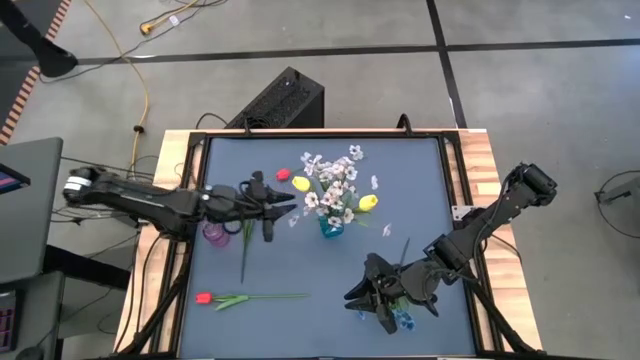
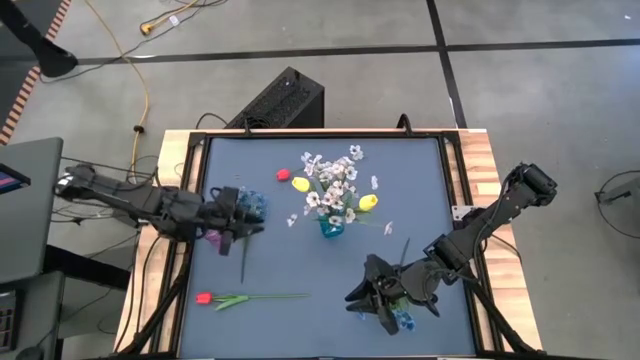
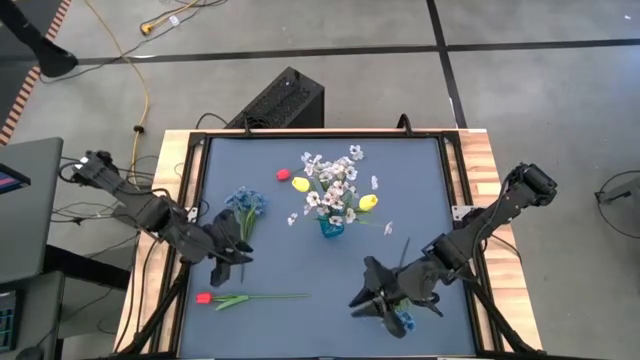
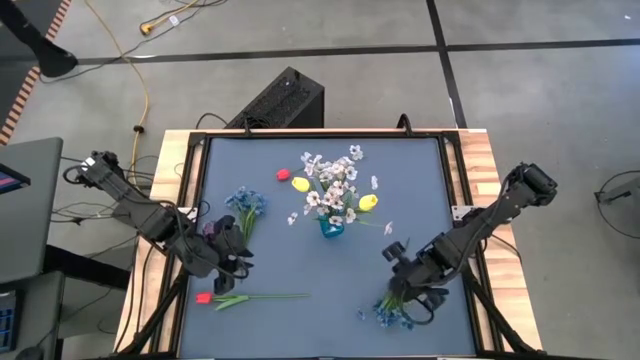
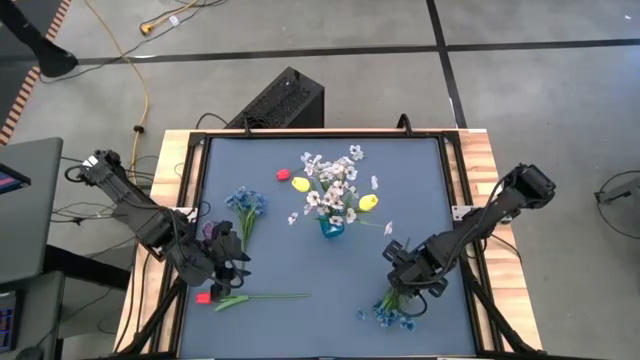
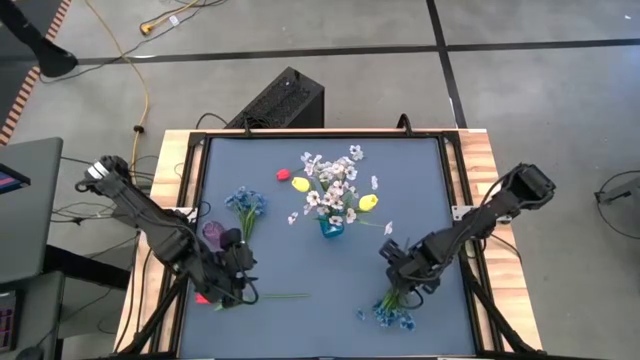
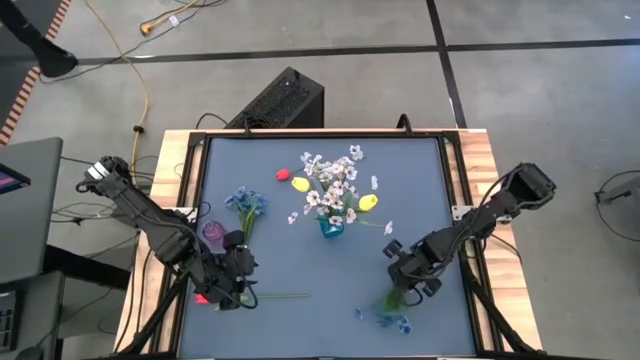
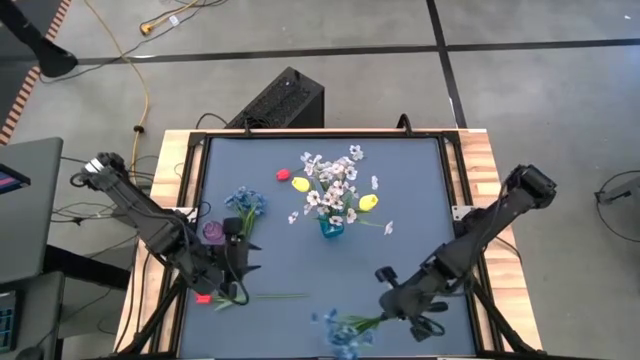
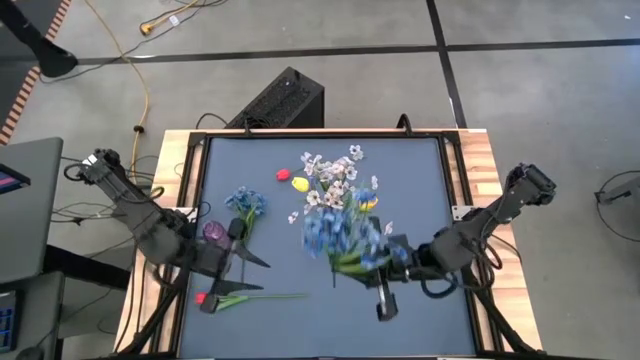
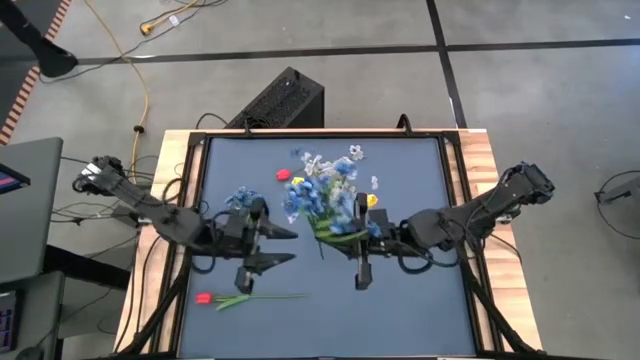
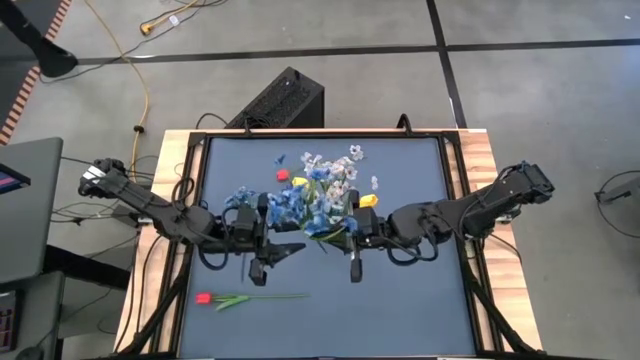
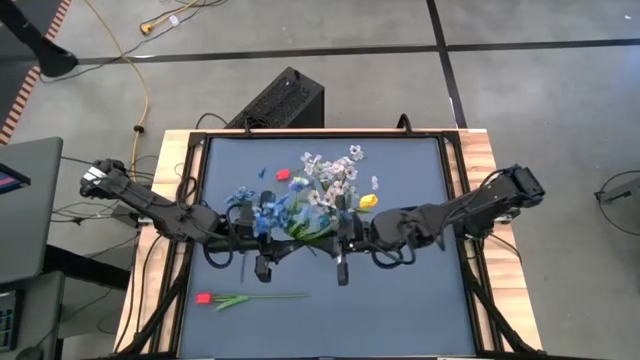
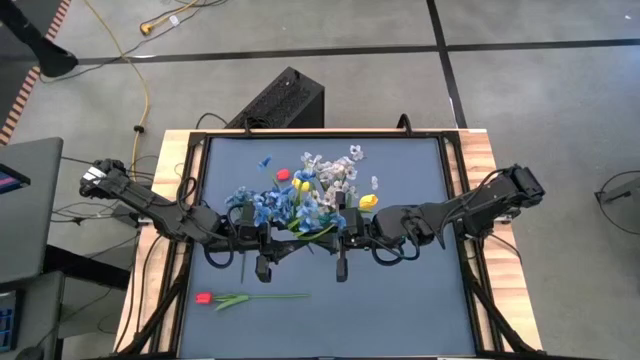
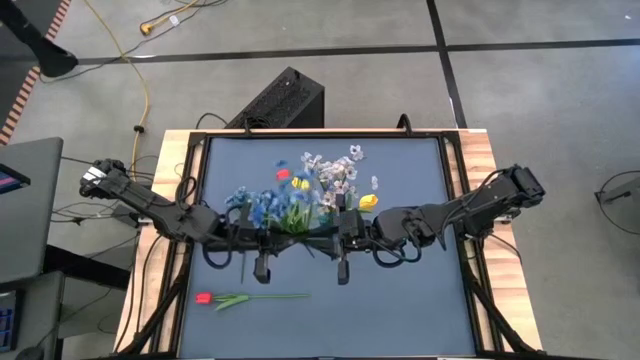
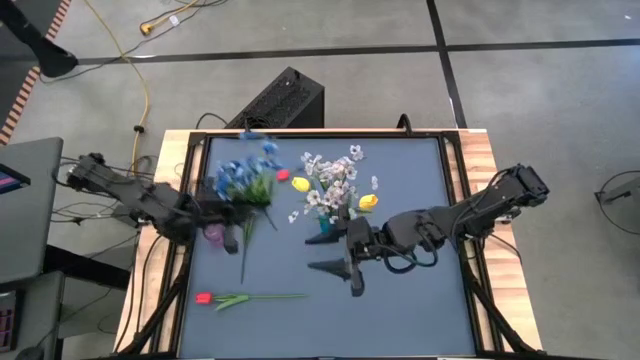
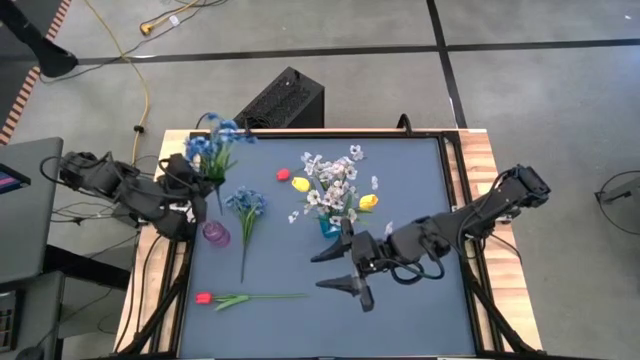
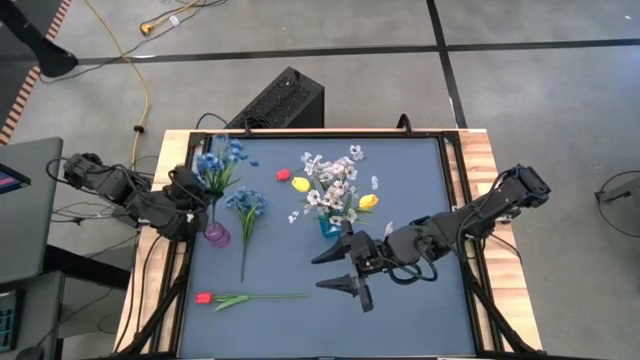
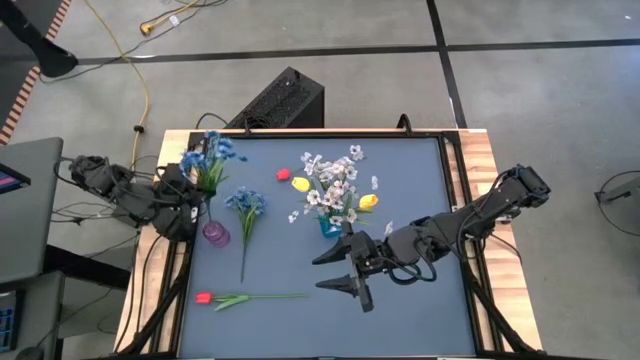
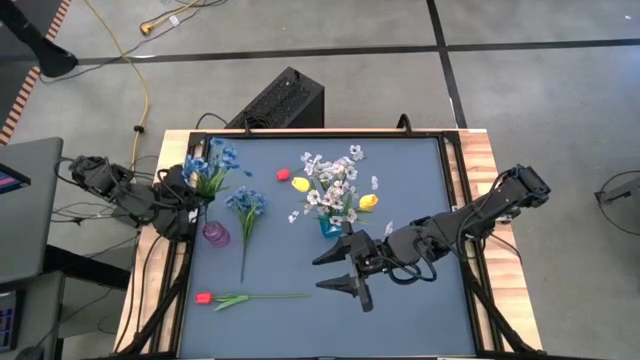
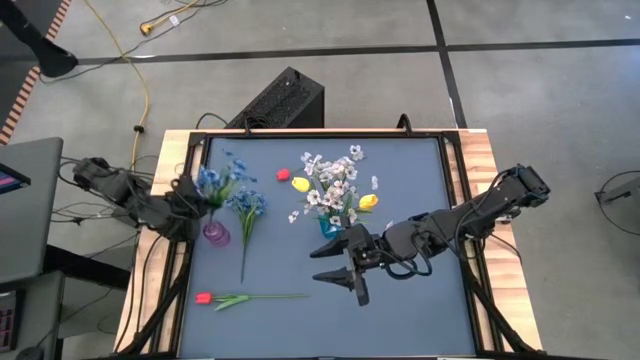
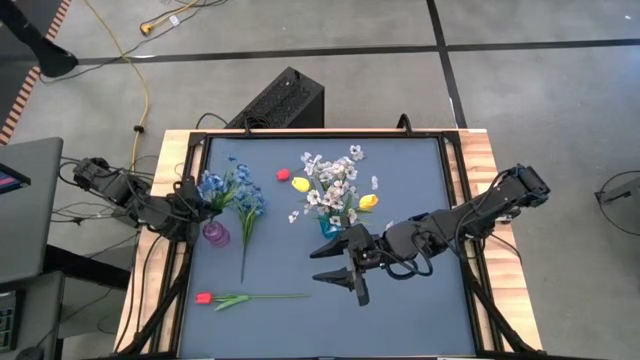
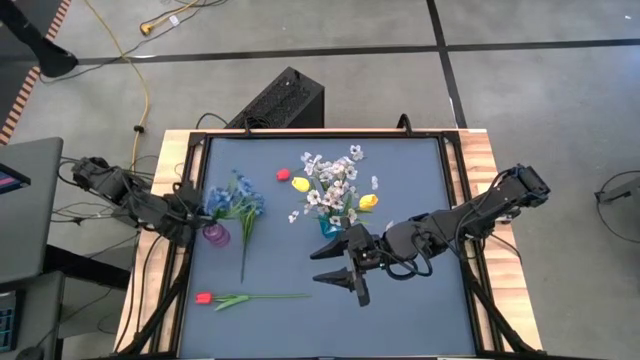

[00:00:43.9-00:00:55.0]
Task: Sort flowers into vase by color
Put the bottom blue flowers into the purple vase

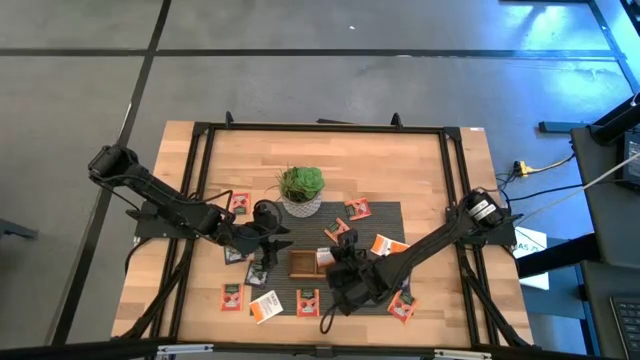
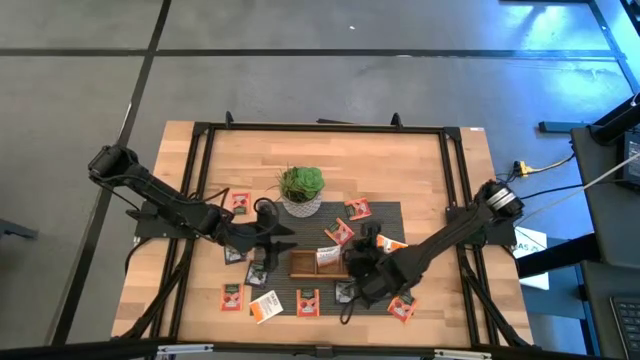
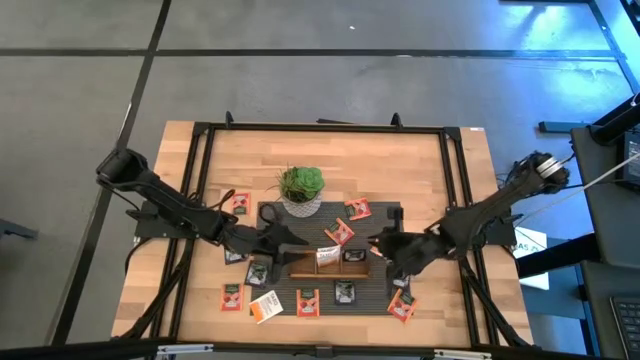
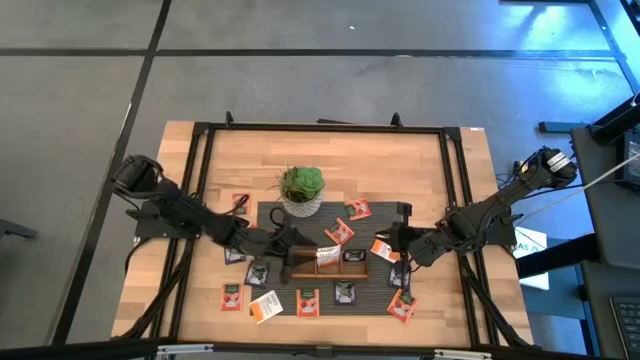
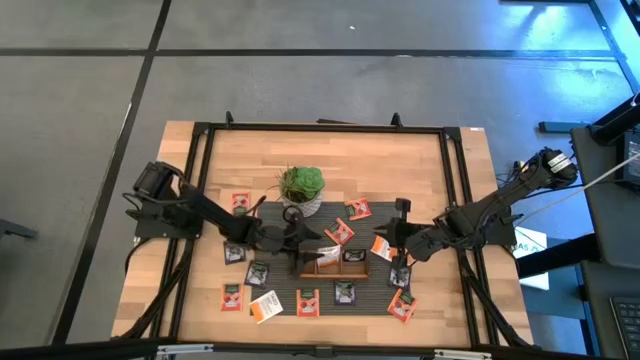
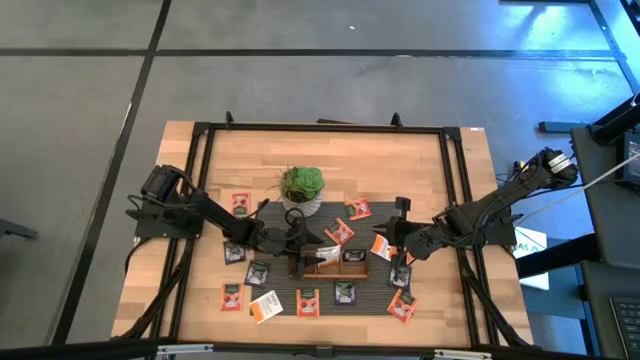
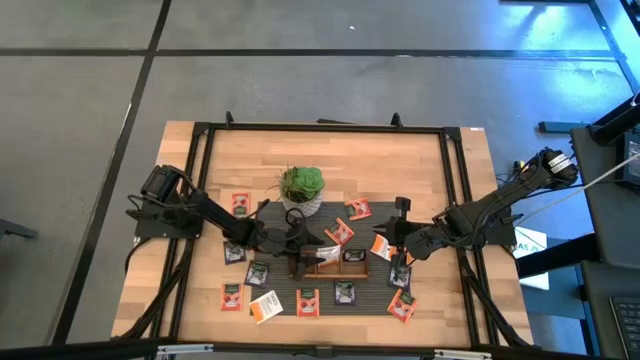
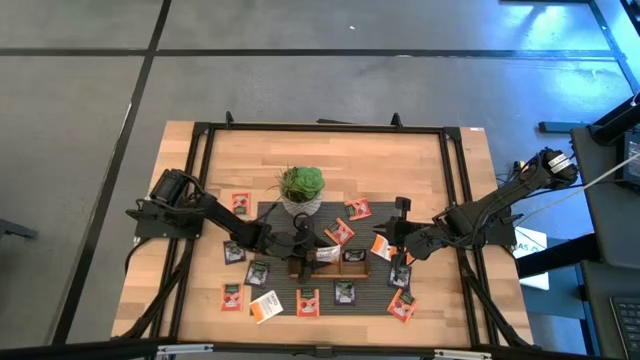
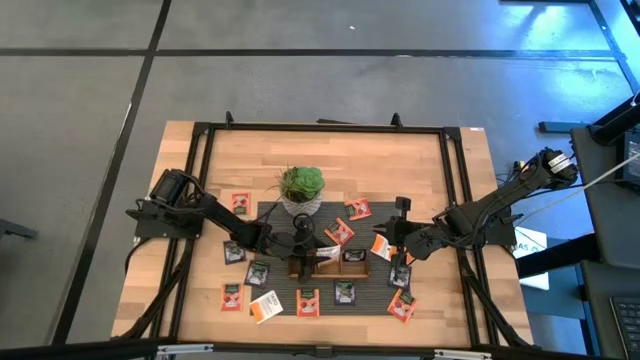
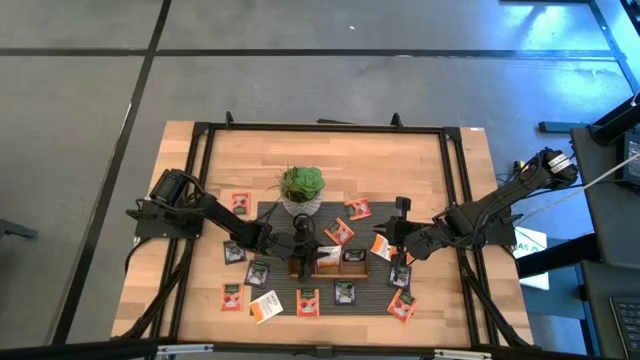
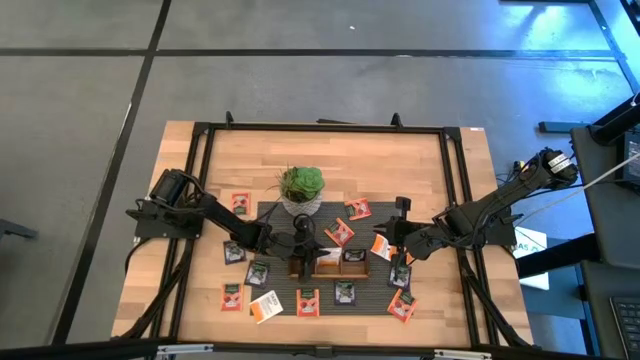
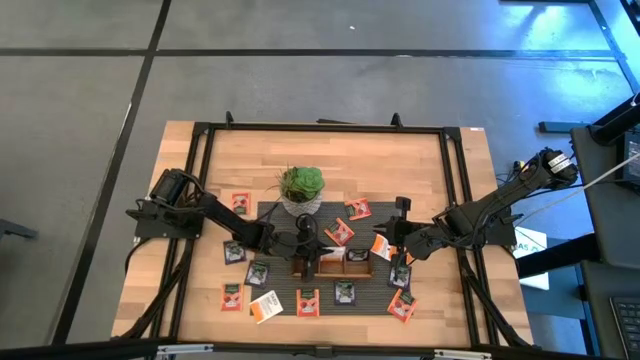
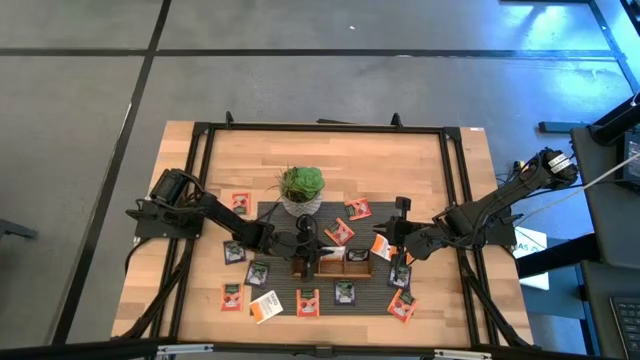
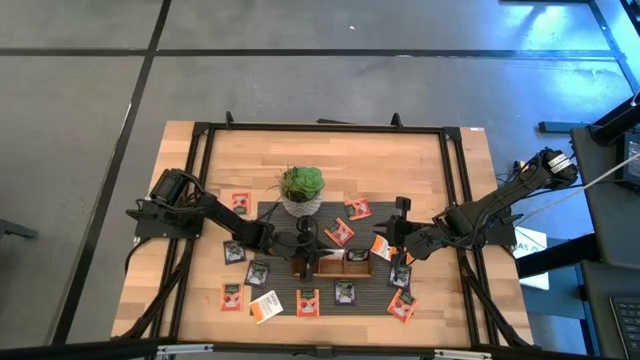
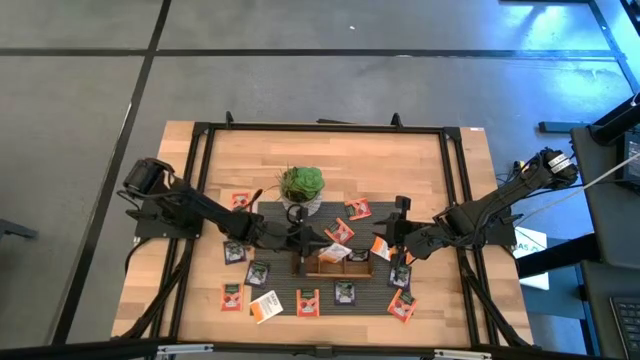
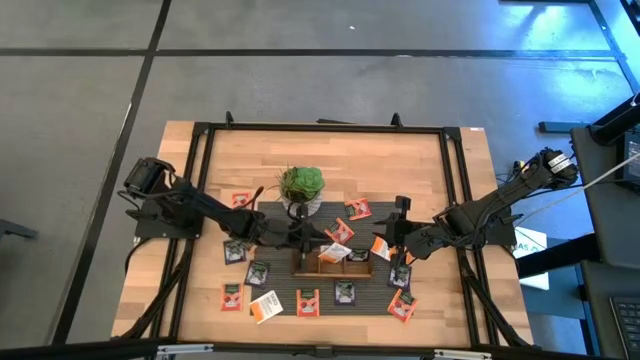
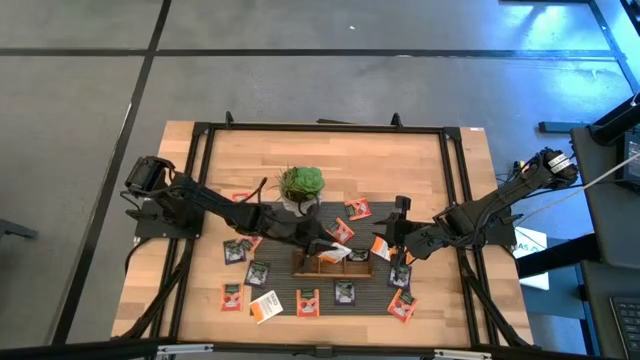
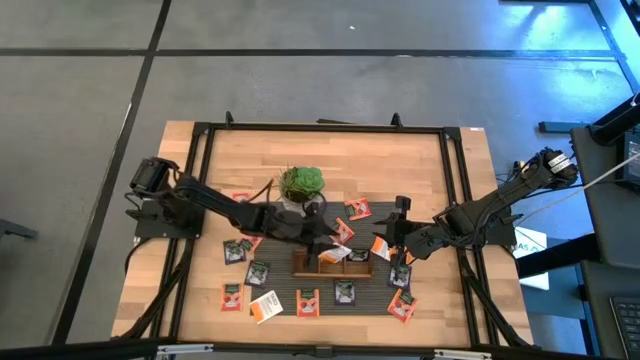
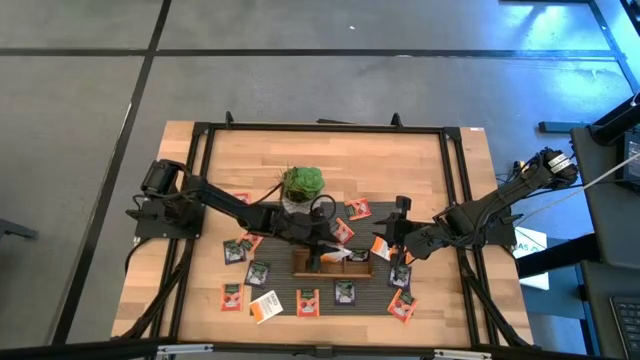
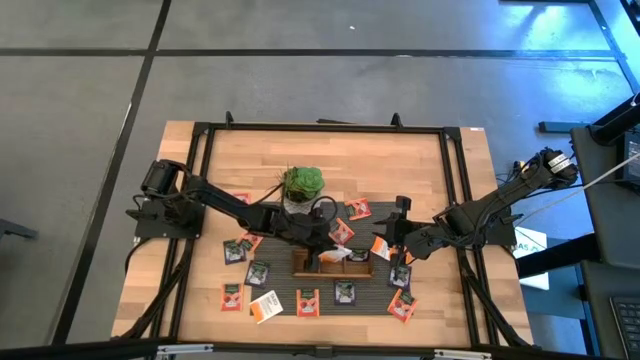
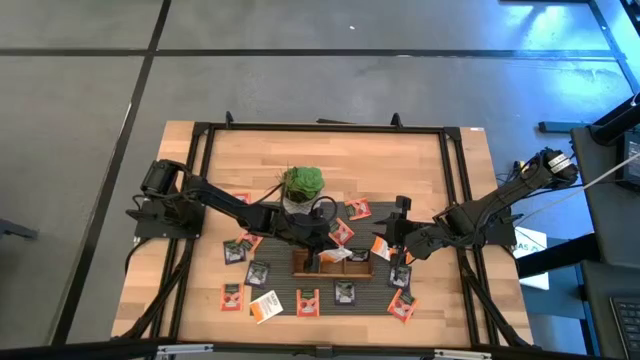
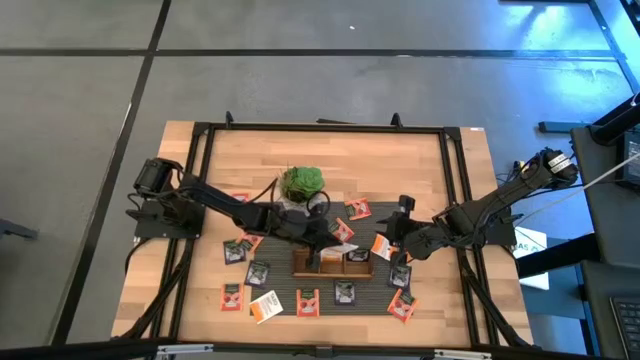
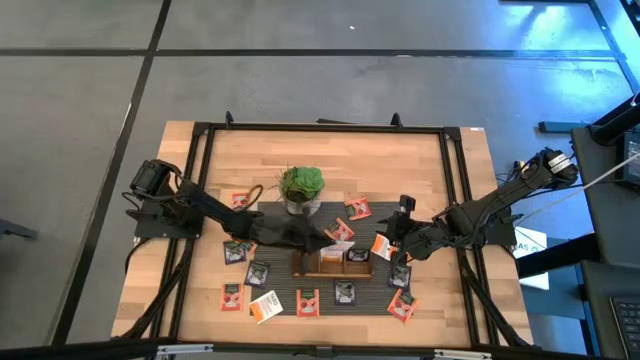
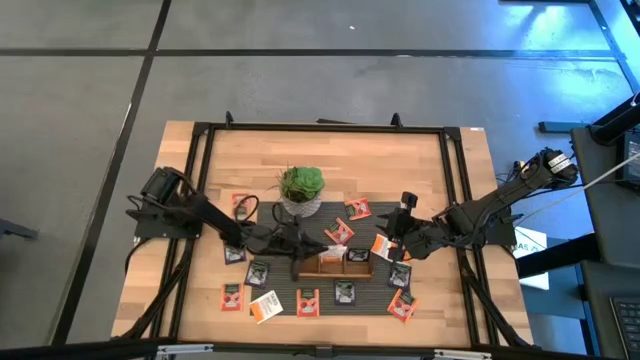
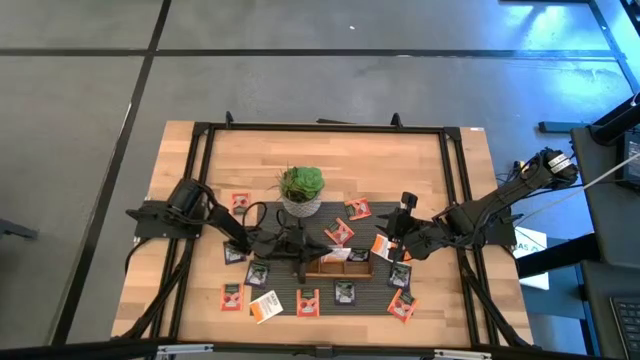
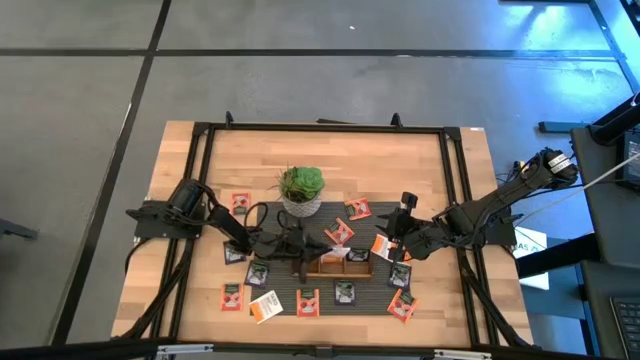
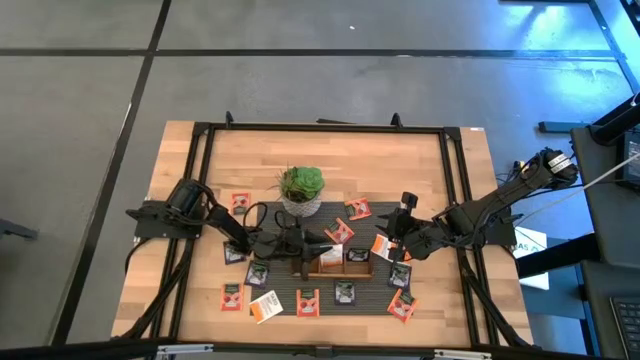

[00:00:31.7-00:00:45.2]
Task: Pick & Place Tea
Adjust the white tea bags on the wooden organizer
